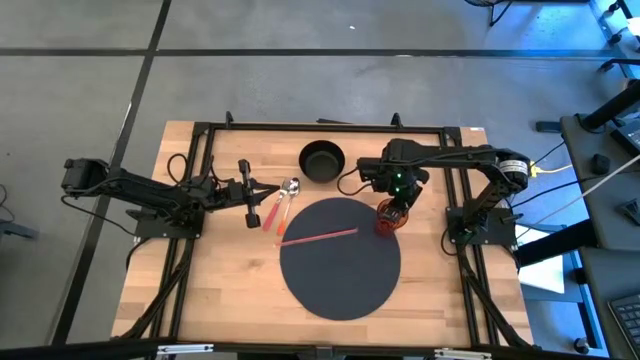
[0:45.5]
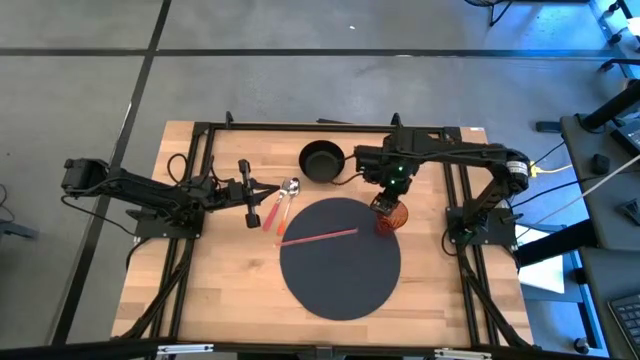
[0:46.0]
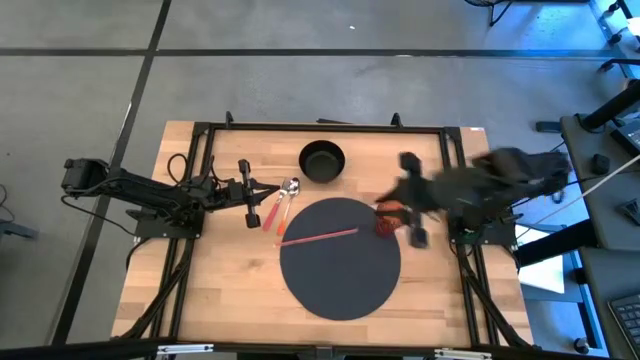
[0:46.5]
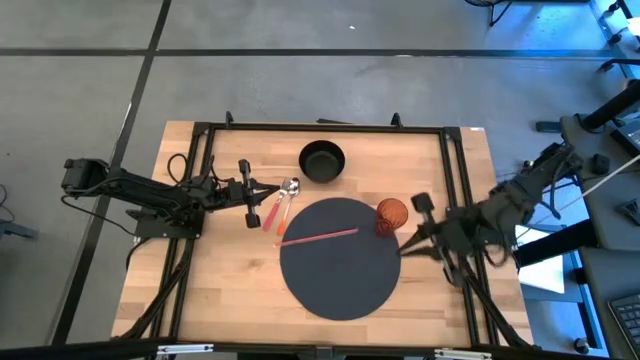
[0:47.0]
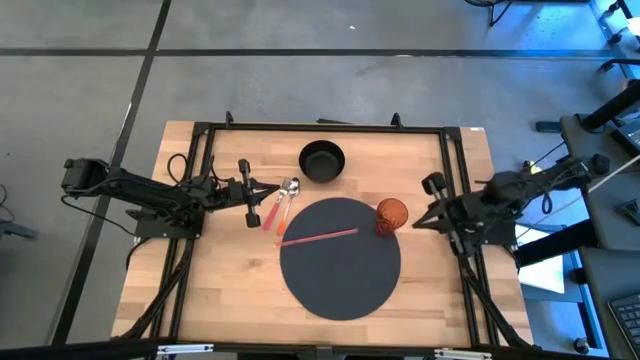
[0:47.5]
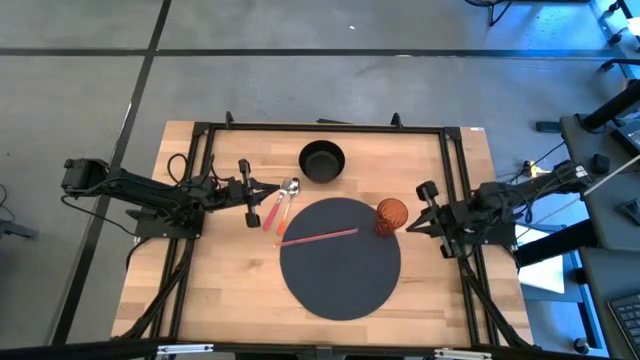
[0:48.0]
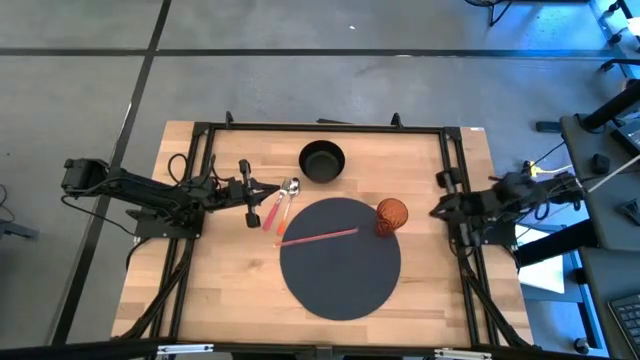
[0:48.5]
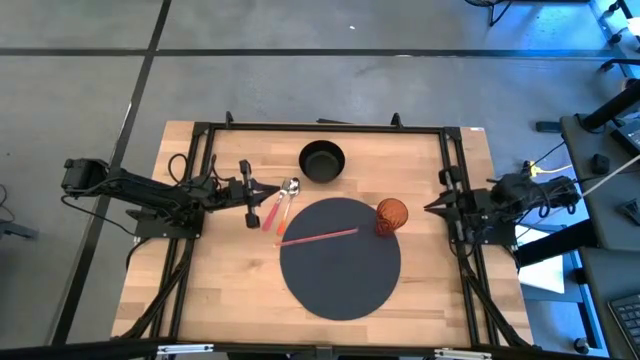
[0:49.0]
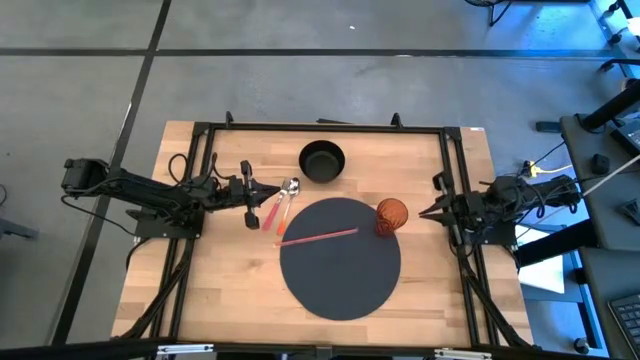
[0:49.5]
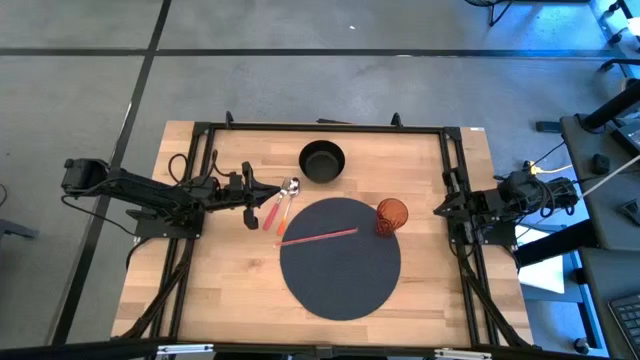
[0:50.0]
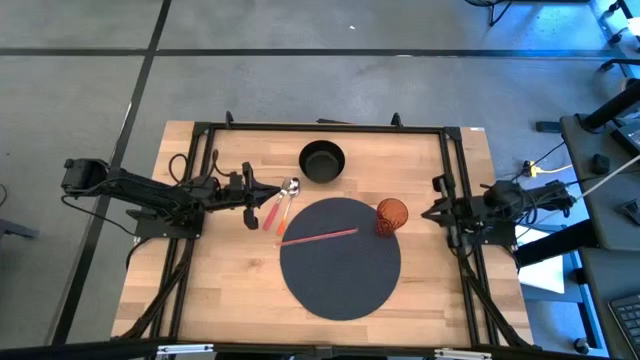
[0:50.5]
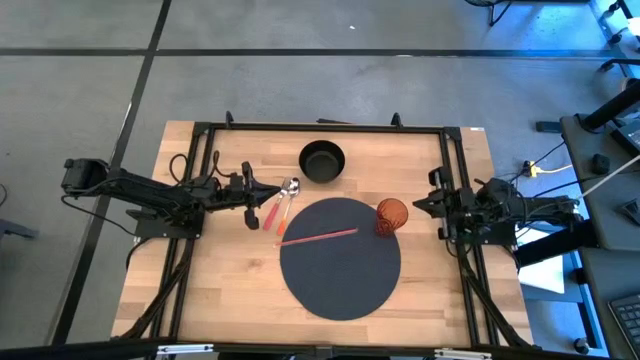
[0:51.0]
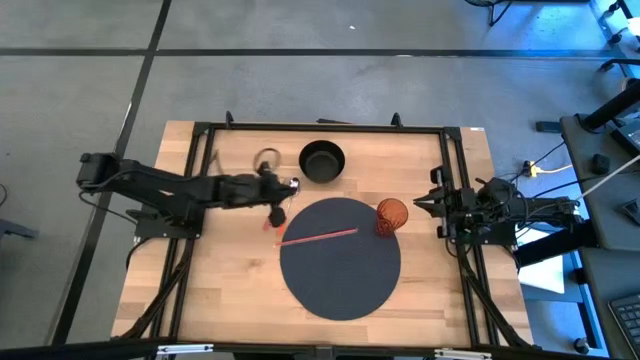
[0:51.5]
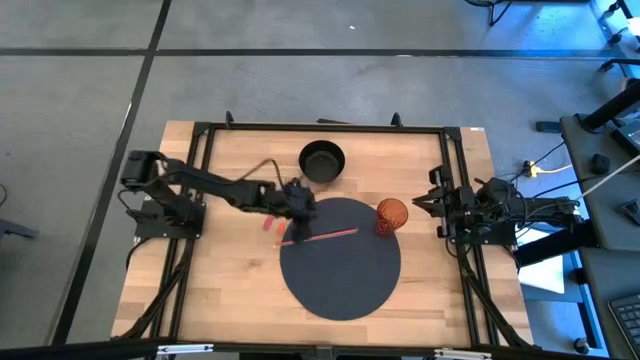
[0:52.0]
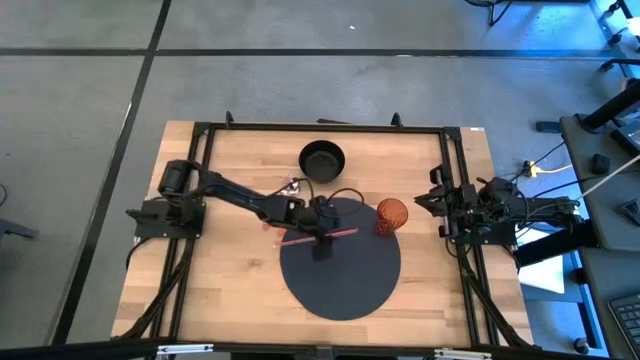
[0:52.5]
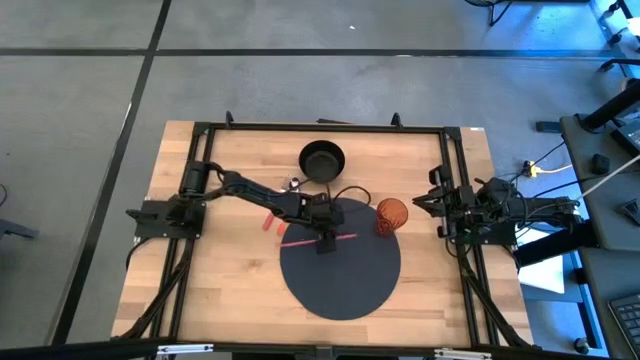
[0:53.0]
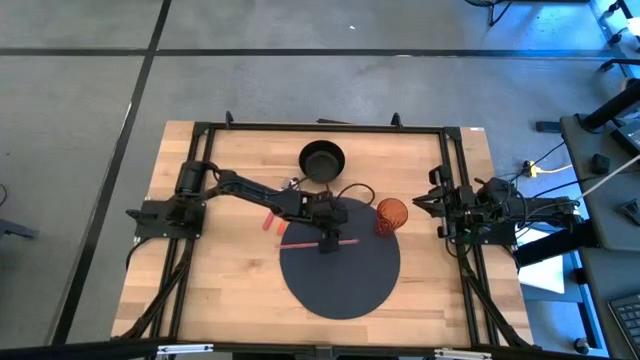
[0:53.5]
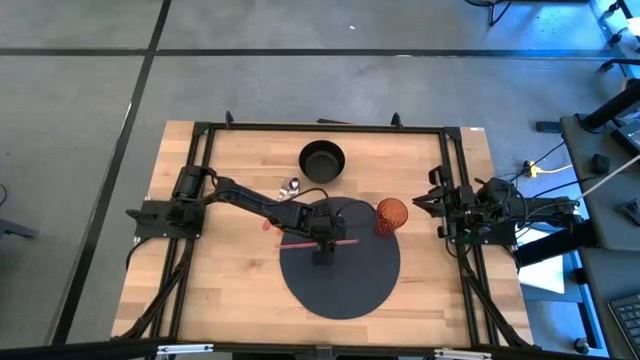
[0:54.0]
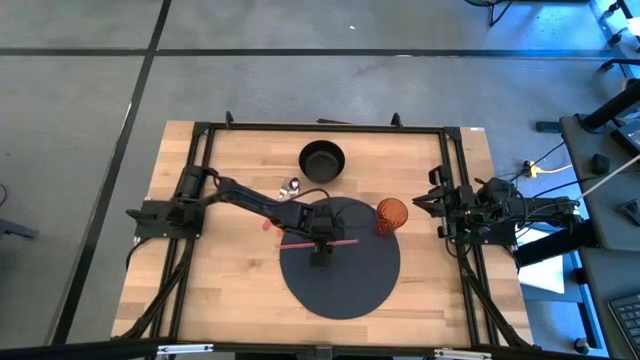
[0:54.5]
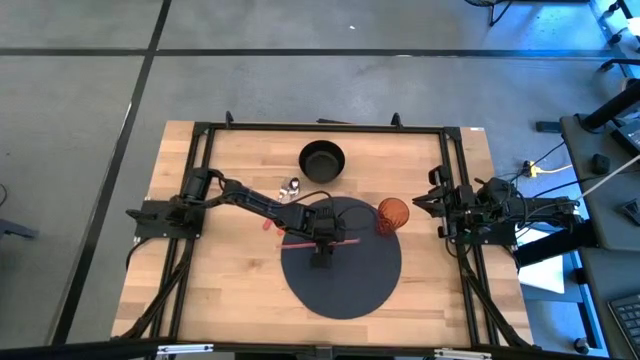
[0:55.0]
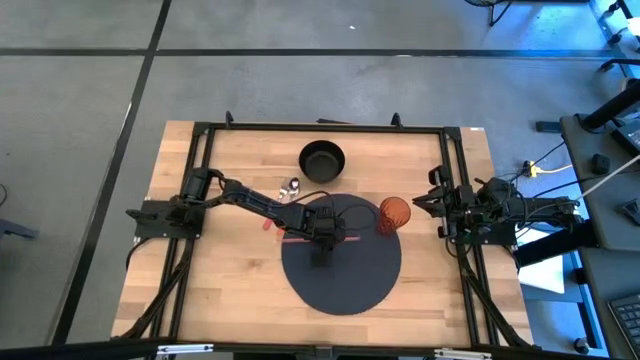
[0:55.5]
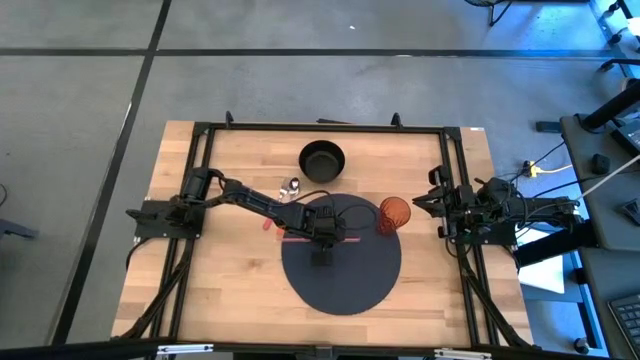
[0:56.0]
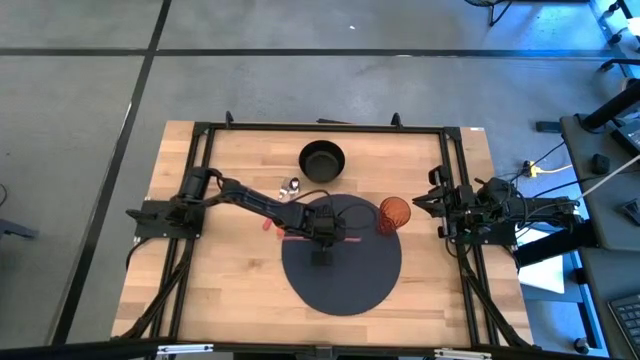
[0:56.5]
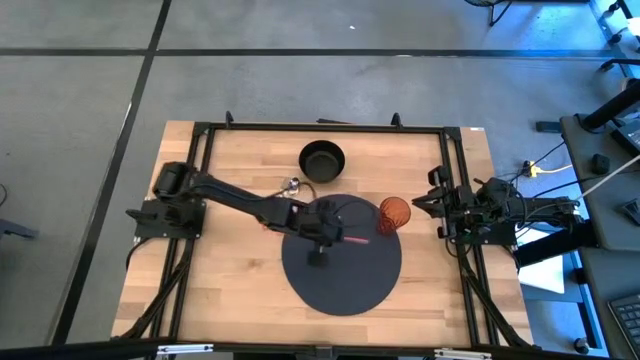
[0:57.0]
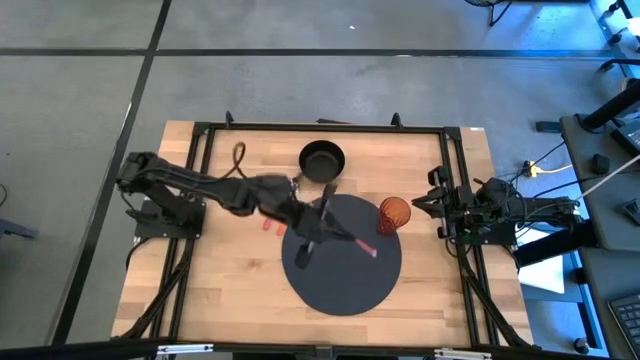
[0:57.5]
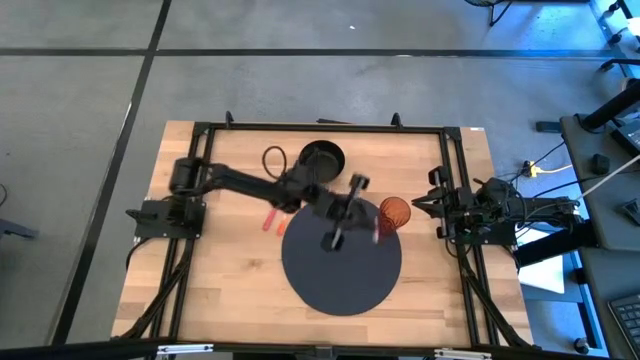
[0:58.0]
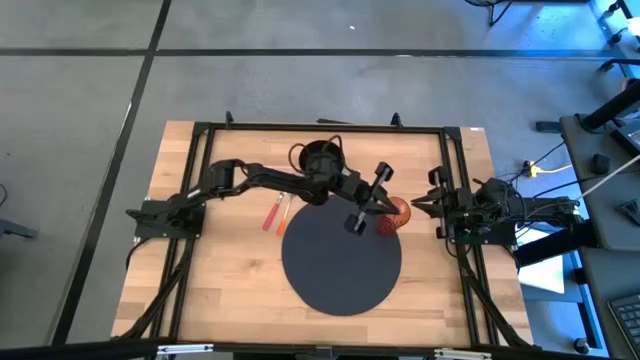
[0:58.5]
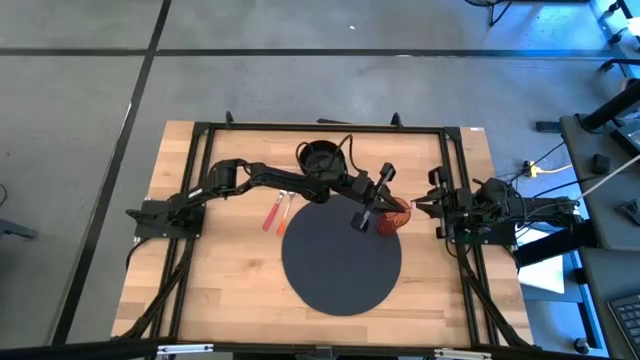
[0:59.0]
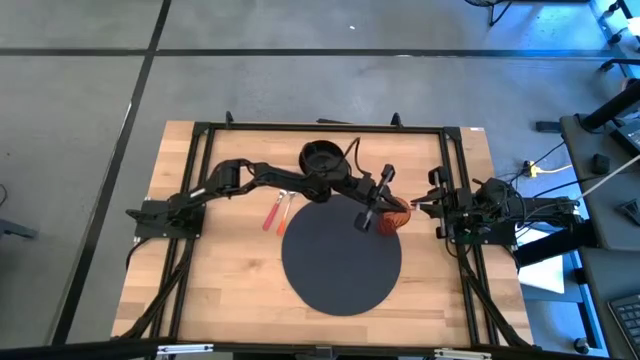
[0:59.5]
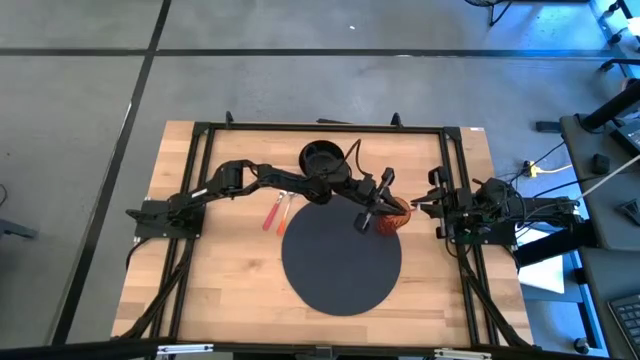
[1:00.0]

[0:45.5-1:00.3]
Task: Pick & Place Utensil
Put the orange straw into the brown glass on the gray mat

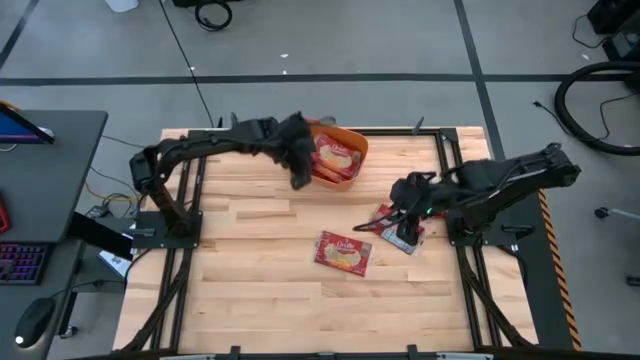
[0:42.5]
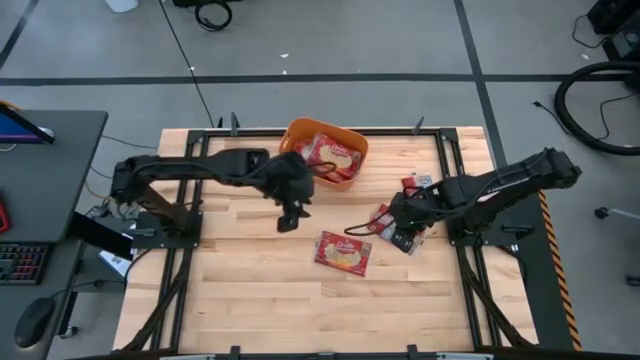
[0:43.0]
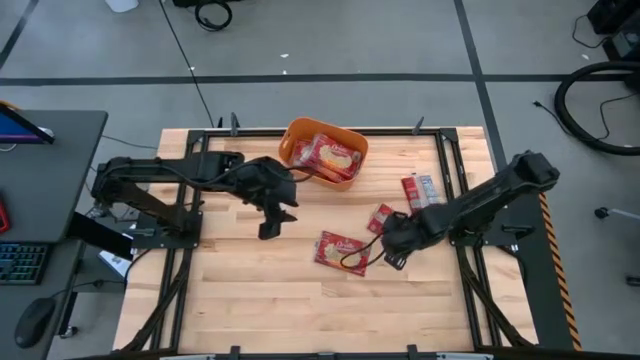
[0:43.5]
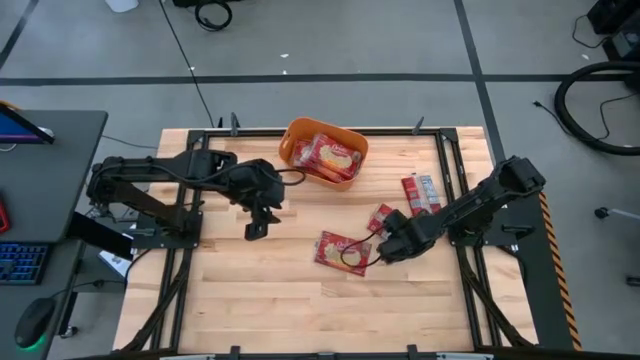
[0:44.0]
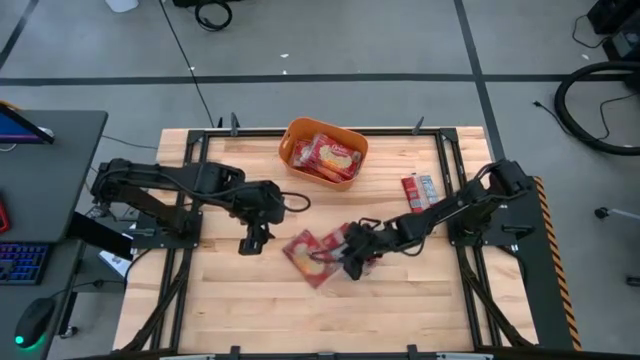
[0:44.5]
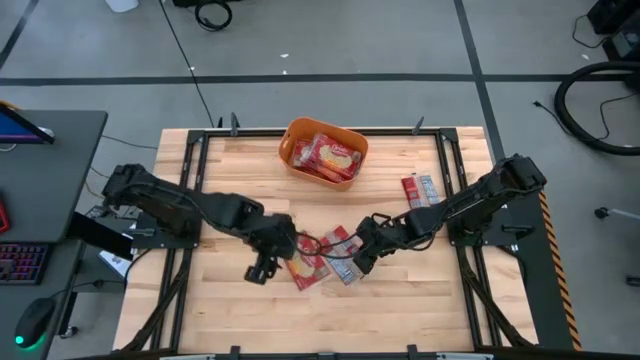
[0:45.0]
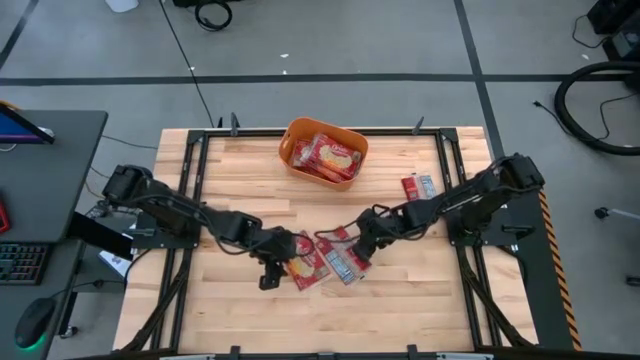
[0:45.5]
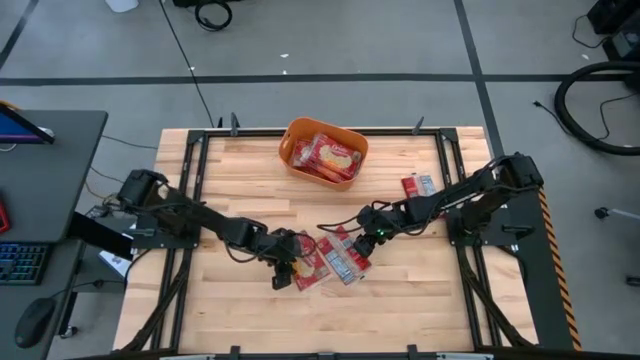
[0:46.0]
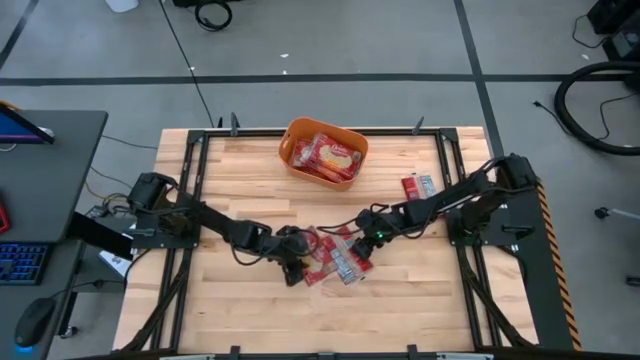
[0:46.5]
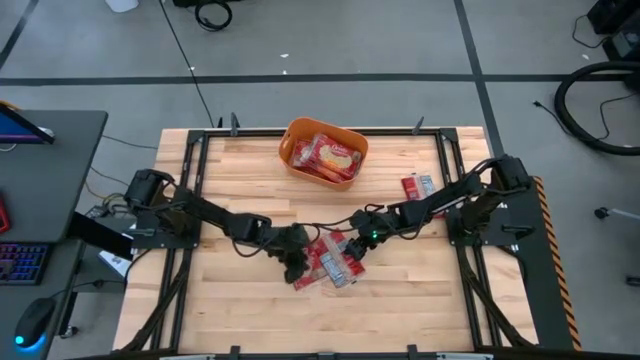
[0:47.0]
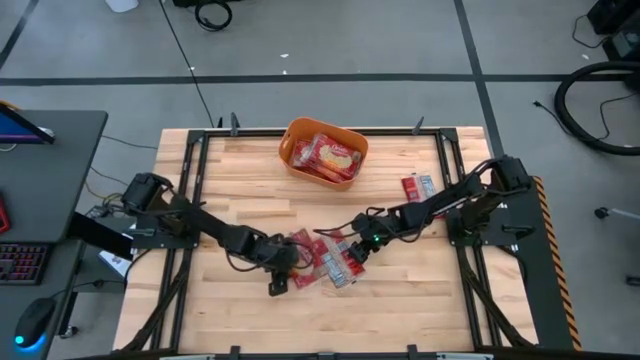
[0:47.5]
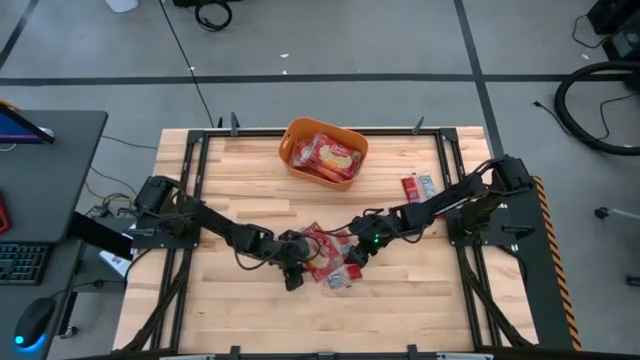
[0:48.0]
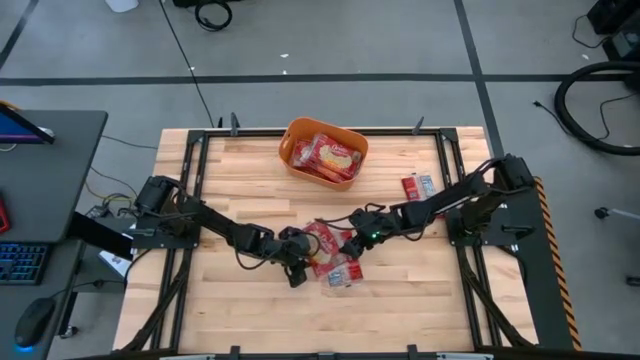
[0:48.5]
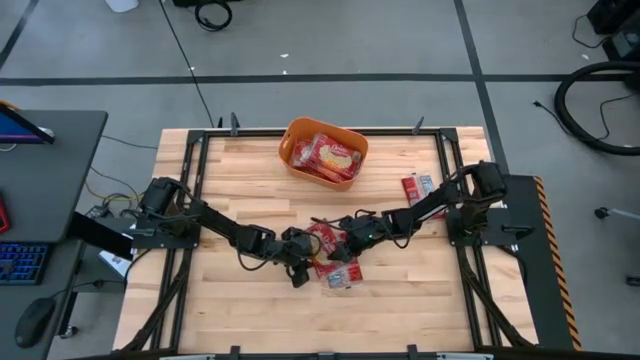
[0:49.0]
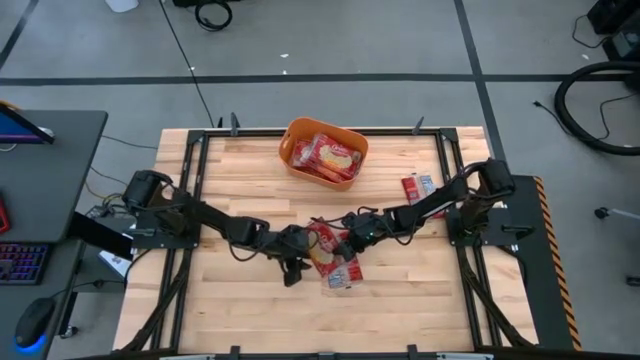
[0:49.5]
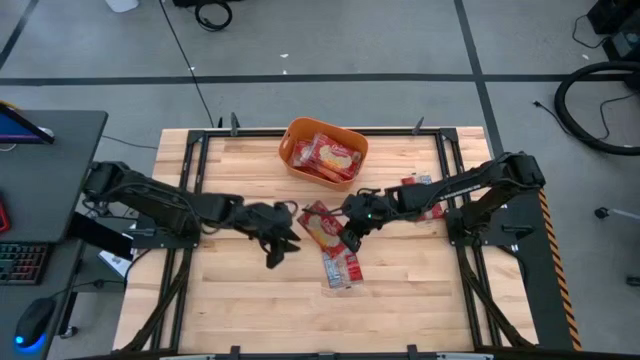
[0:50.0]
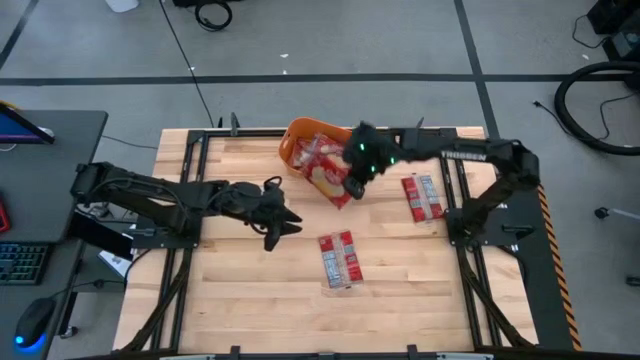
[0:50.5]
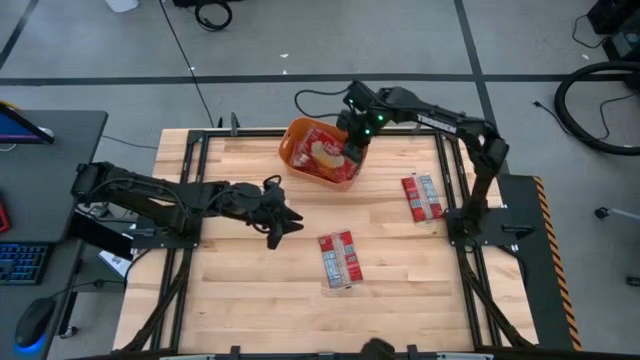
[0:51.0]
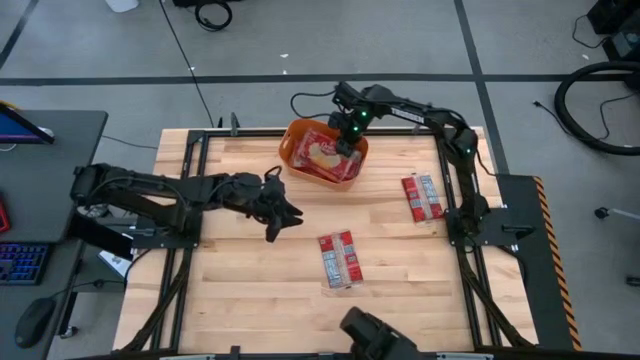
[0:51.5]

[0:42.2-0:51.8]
Task: Sort popcorn bags into baskets
Put the red popcorn bag into the orange bin
